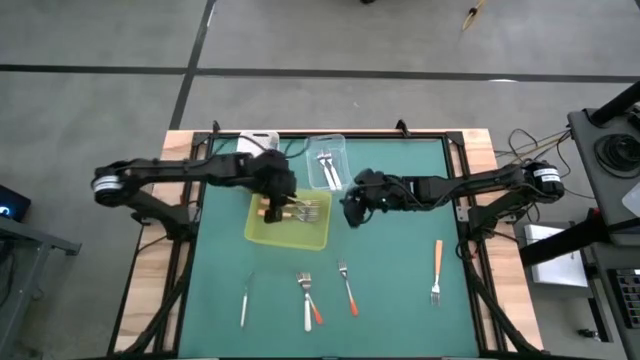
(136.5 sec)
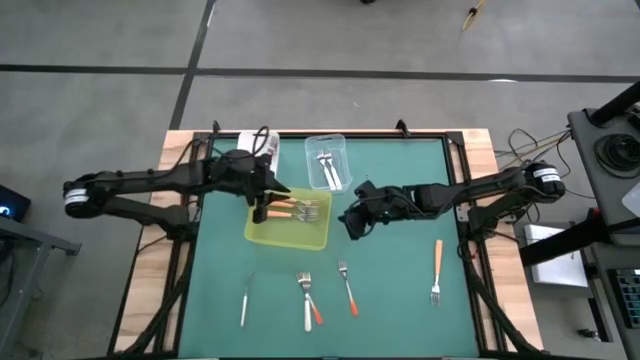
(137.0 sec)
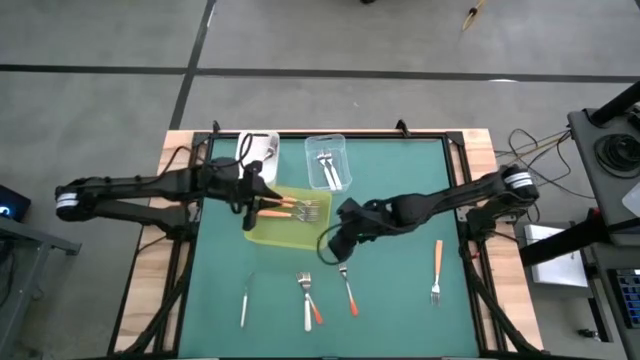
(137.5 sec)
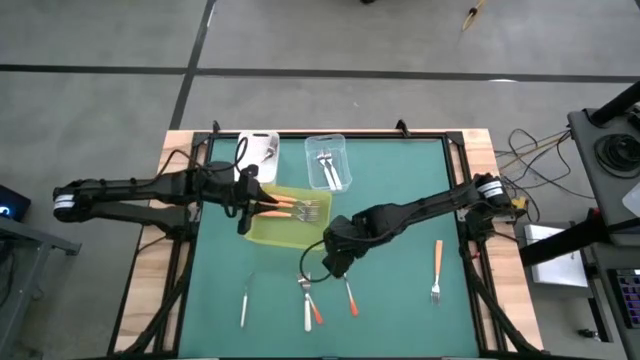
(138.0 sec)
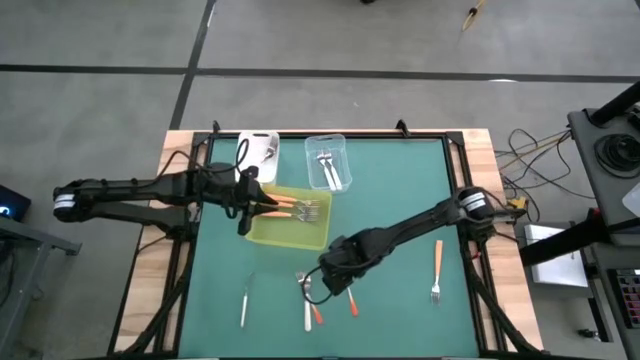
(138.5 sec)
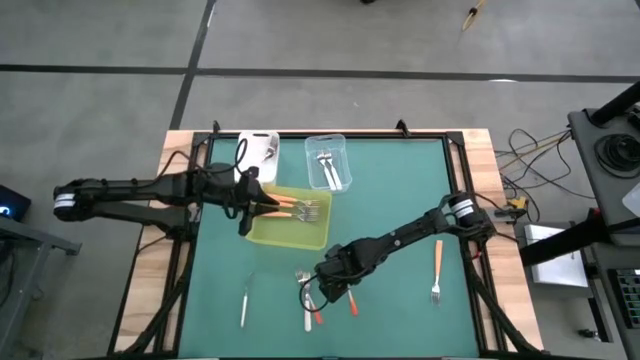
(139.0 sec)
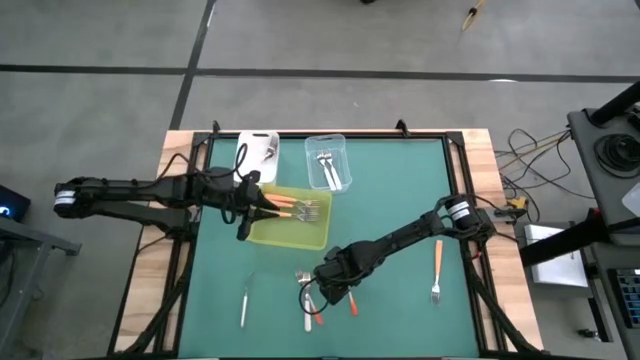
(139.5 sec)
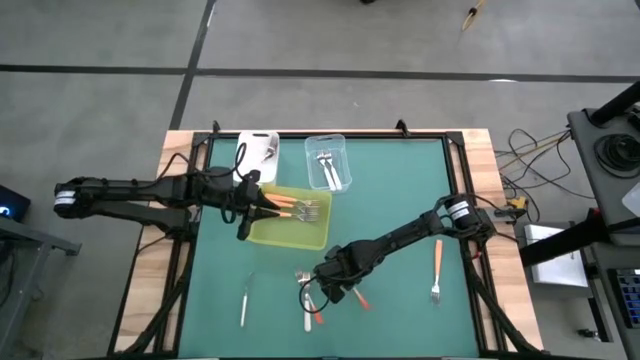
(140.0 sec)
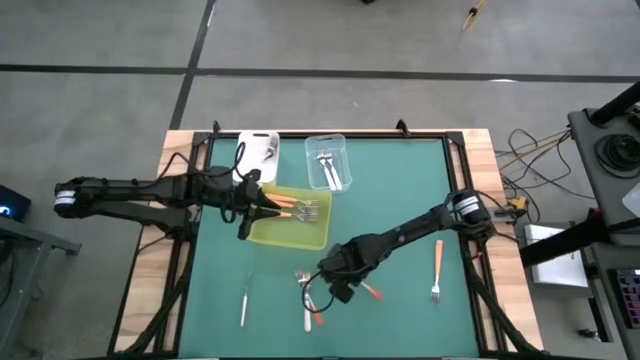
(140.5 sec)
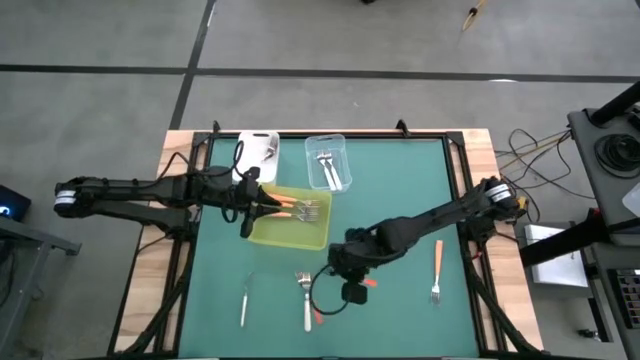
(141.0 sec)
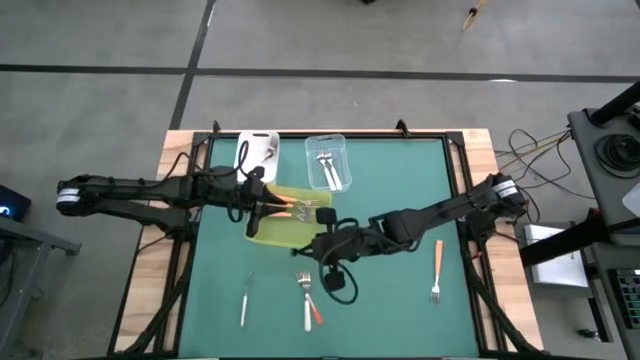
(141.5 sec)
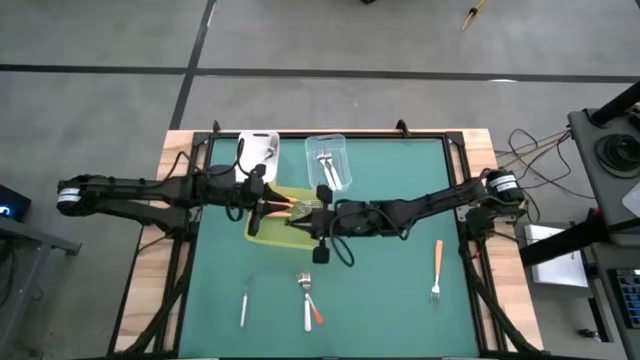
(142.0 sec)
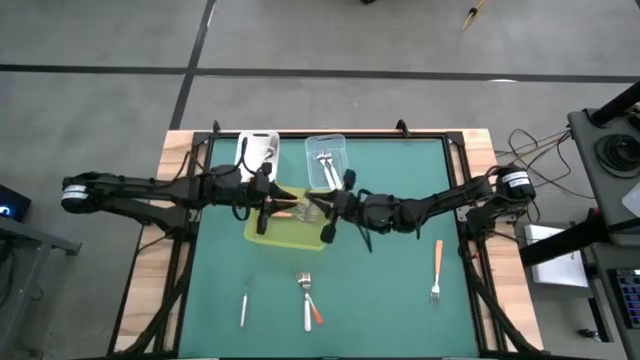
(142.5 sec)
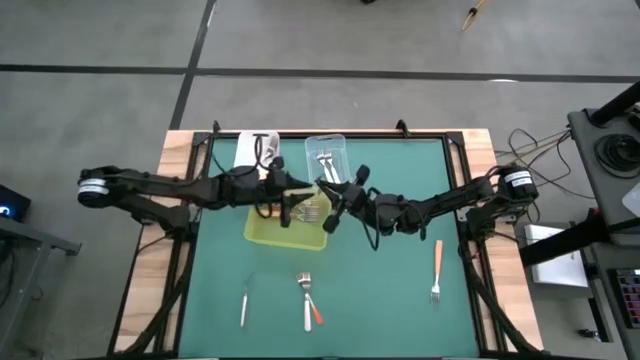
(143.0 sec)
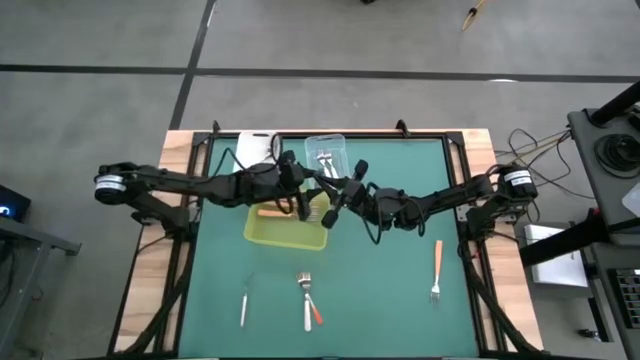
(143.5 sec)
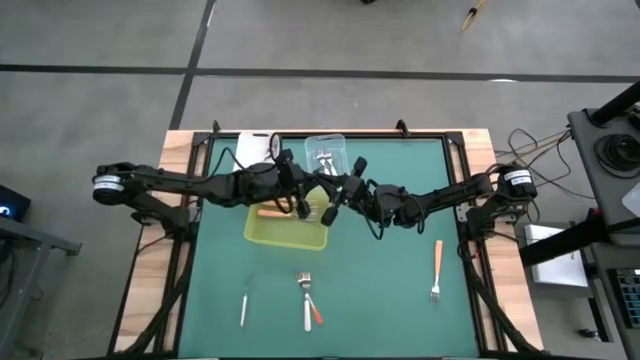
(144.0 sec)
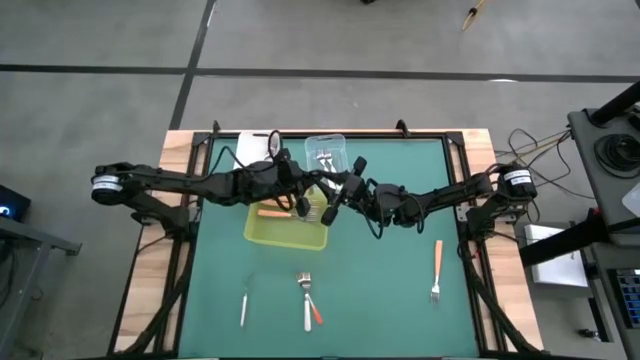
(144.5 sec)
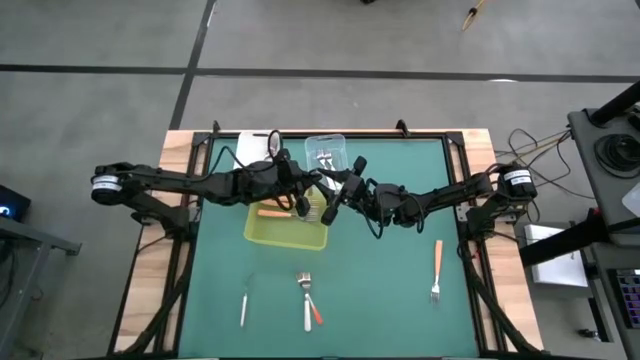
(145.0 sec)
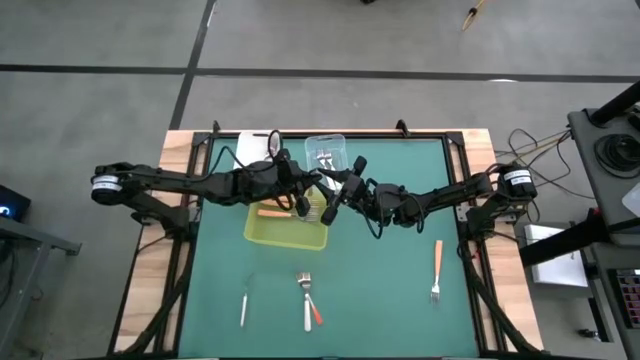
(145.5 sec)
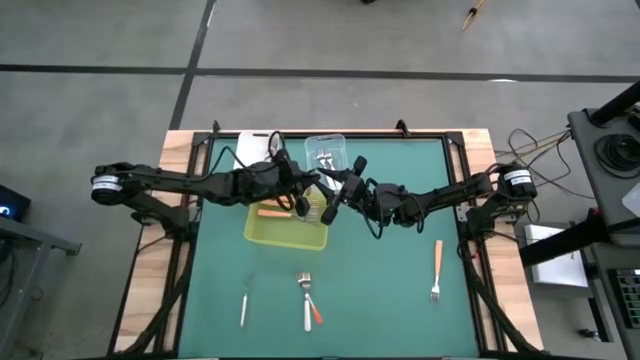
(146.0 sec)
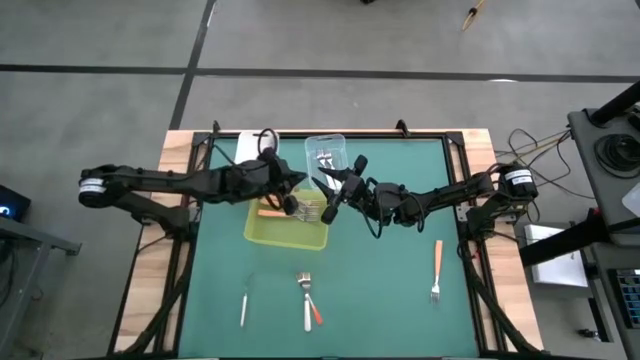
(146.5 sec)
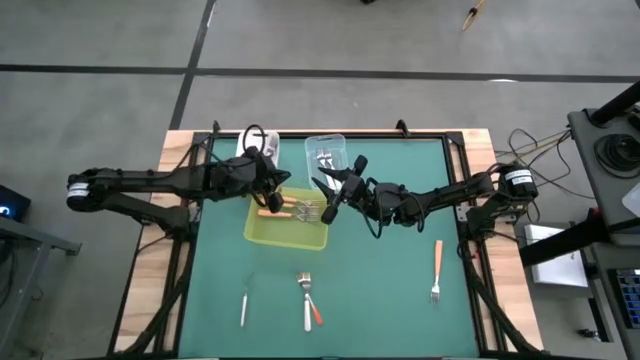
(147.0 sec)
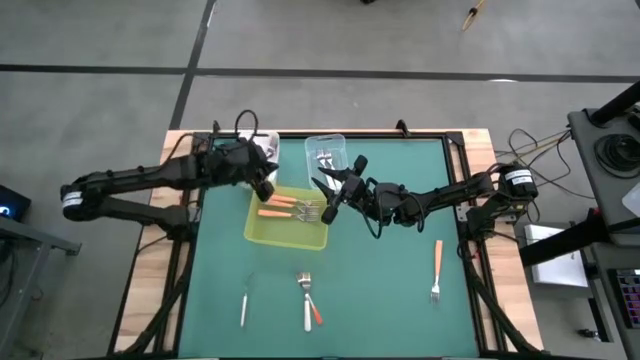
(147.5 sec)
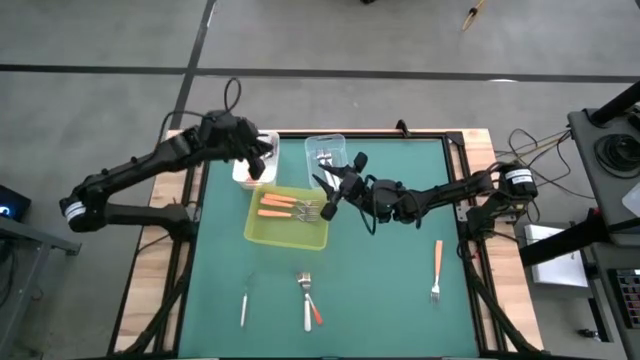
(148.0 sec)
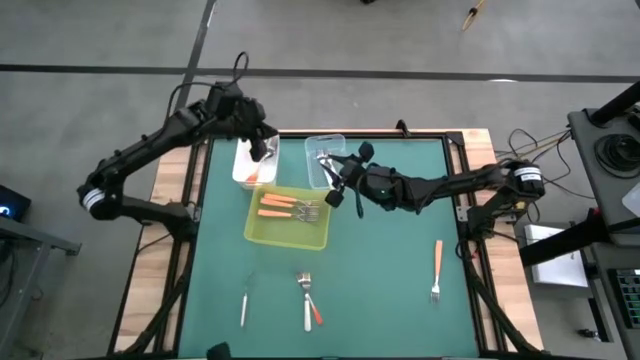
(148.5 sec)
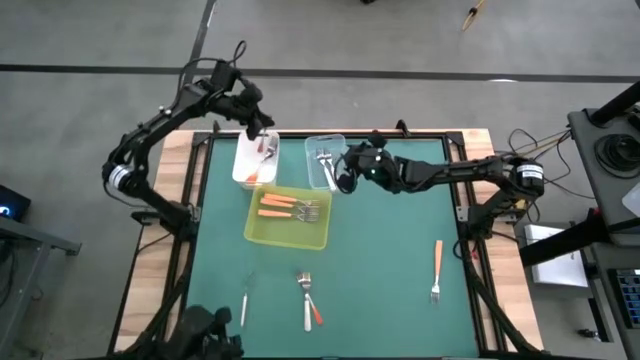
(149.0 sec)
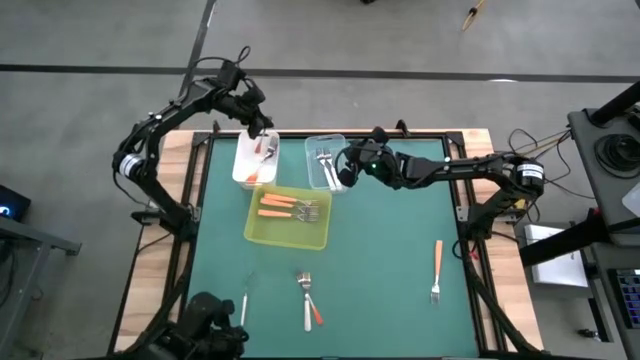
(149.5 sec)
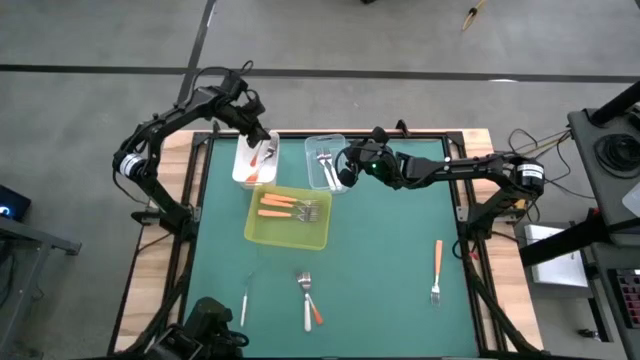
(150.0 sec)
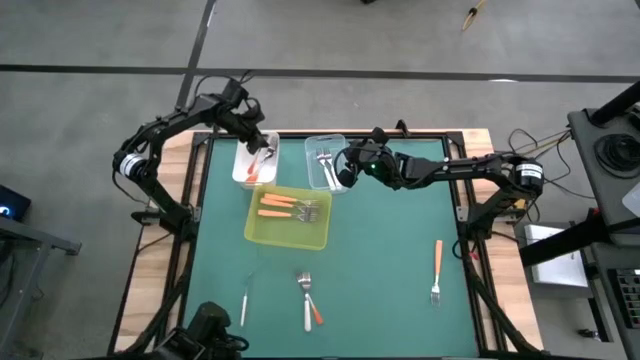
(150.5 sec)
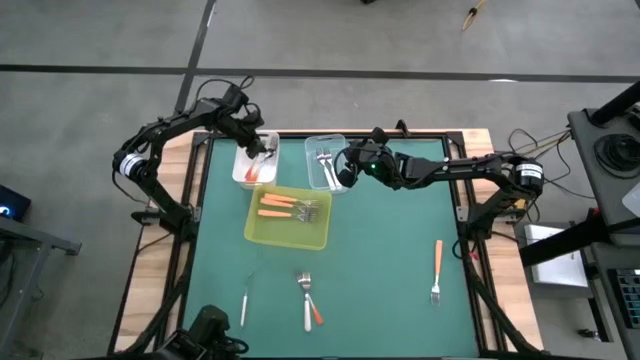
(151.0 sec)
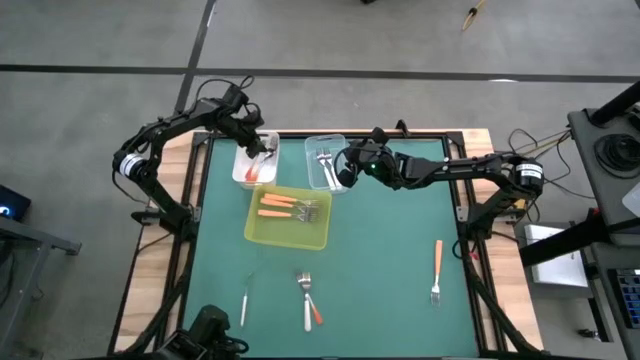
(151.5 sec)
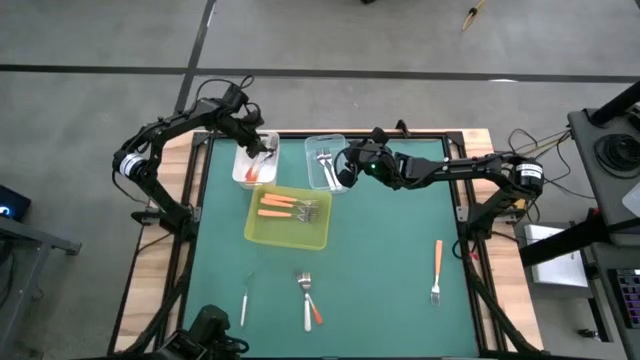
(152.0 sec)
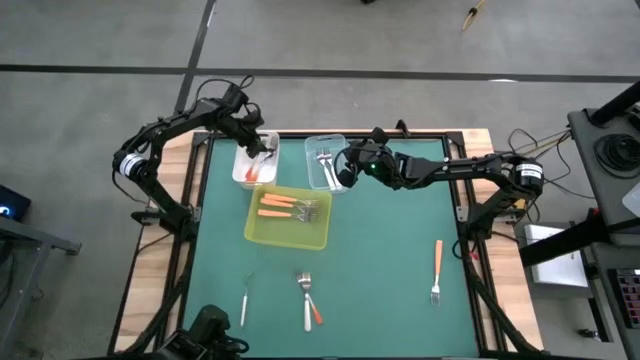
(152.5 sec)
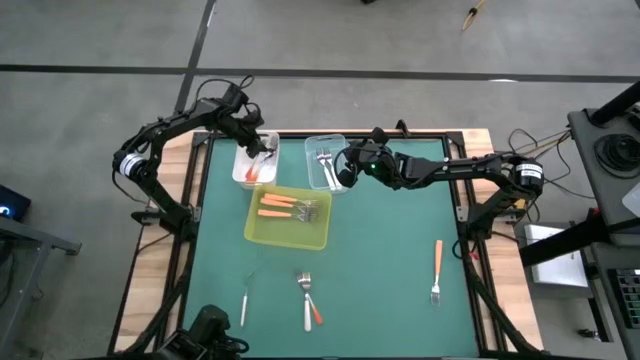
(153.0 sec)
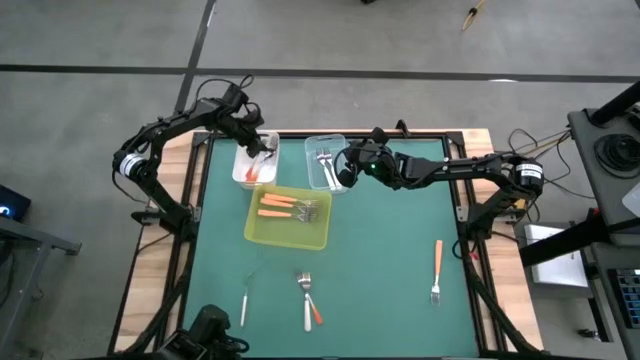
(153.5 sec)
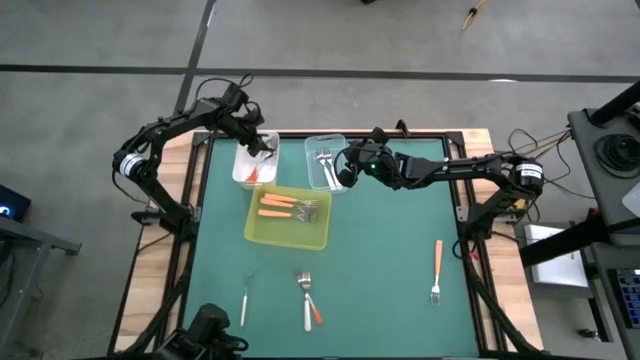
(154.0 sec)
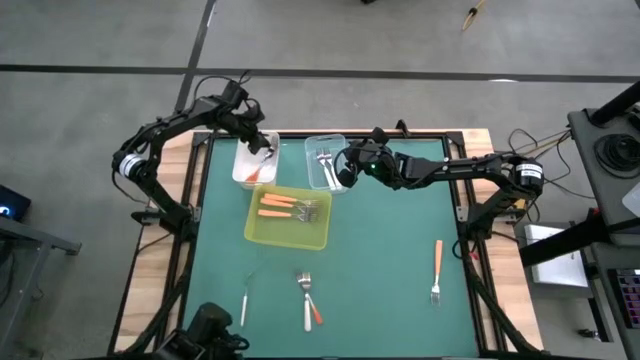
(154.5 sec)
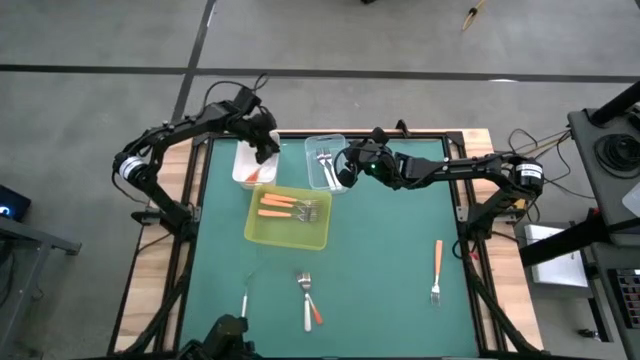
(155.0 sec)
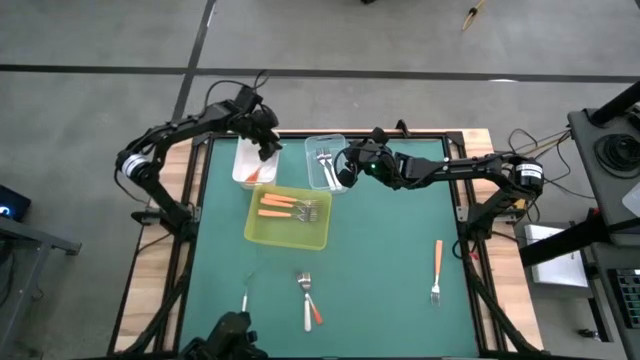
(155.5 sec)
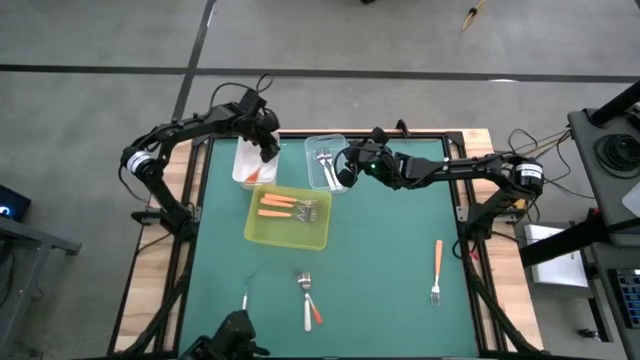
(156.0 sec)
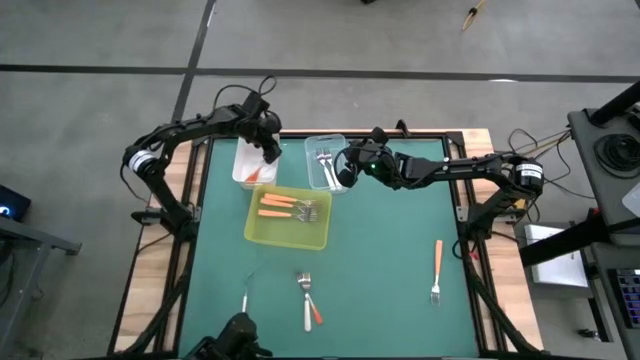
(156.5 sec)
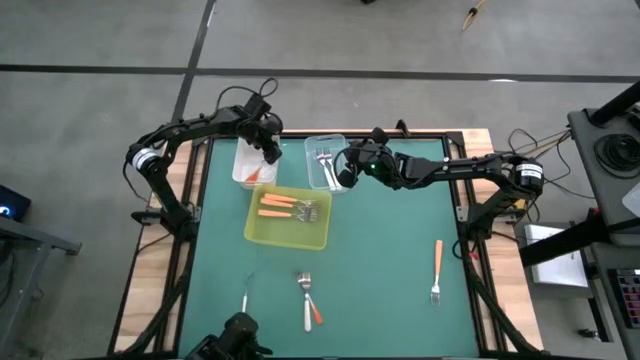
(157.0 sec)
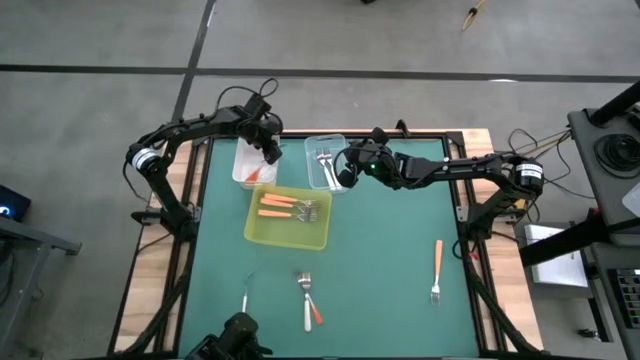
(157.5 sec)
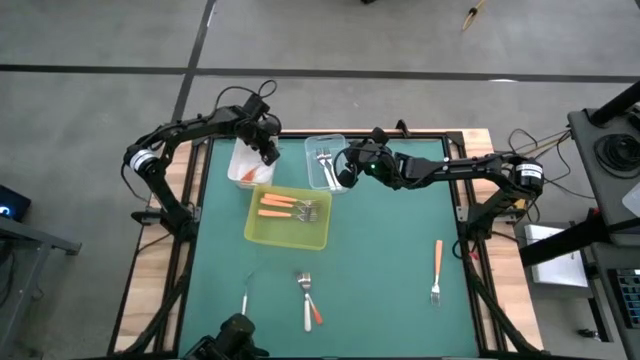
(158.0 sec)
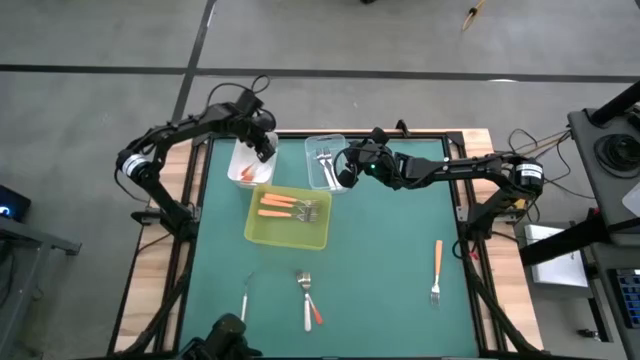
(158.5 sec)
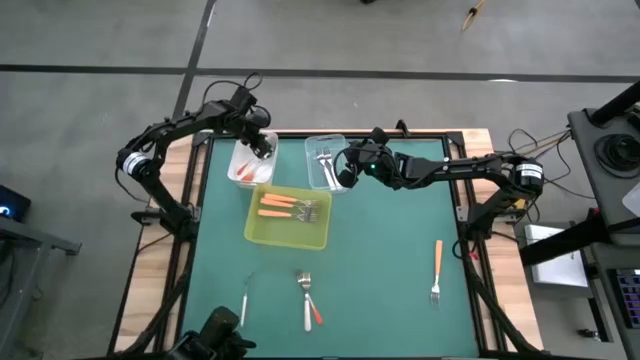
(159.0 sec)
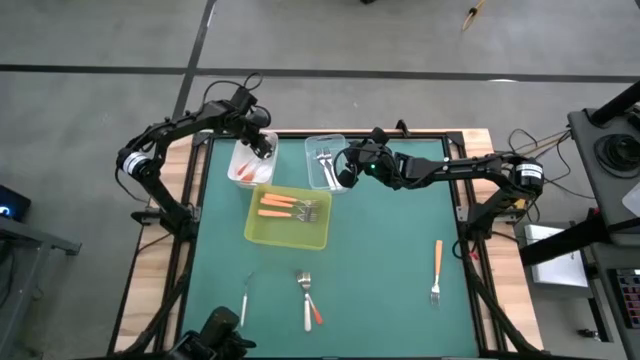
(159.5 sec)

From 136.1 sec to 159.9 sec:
Task: Sort silverware by color (type)
Put the orange fork into the white bin
